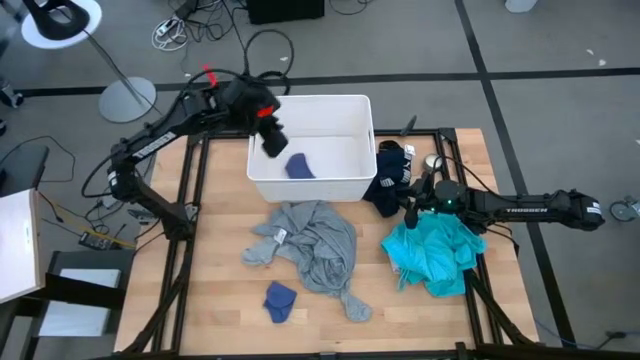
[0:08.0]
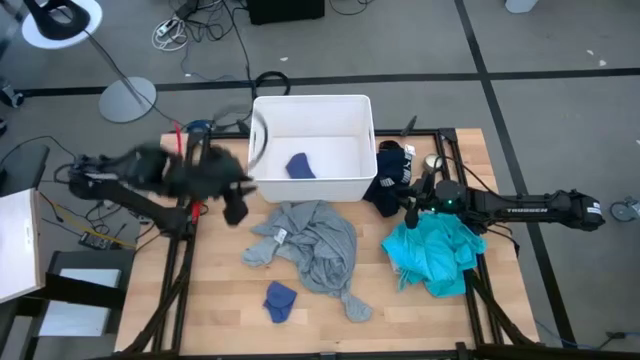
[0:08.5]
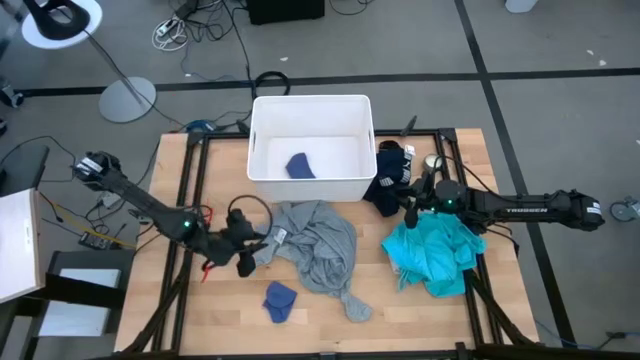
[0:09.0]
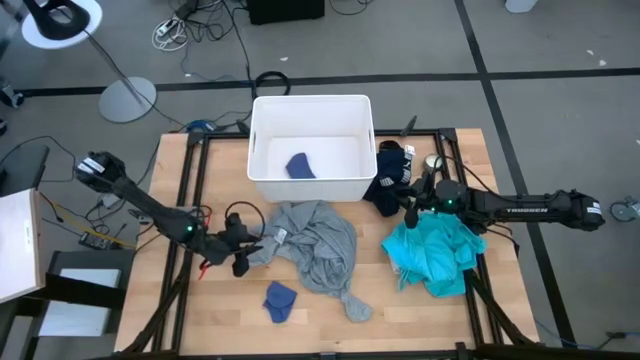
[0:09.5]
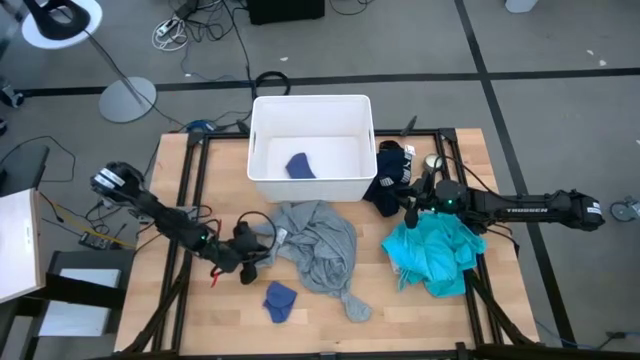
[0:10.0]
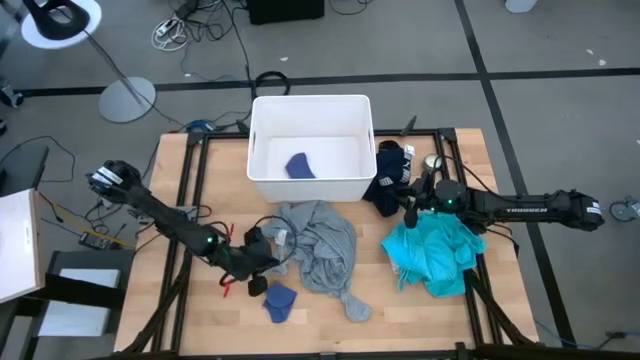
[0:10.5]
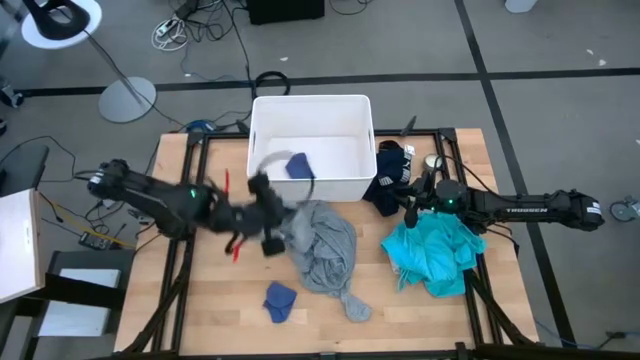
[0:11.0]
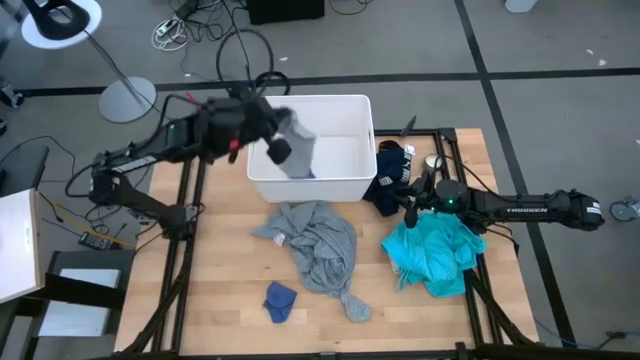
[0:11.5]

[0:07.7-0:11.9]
Task: Sort clothes
Put the left gray sock into the white laundry bin

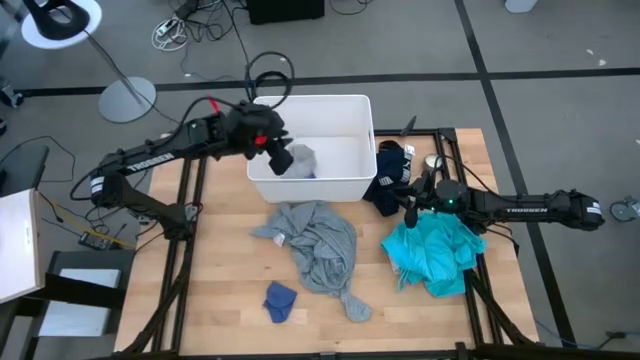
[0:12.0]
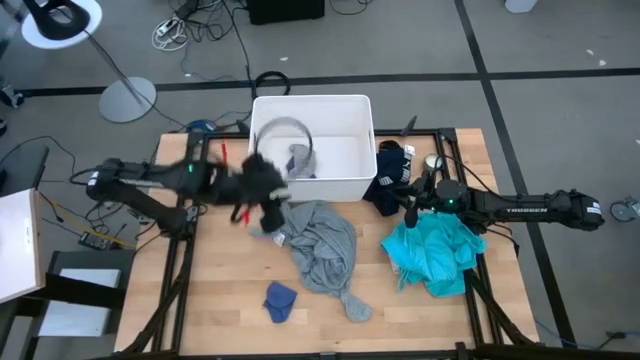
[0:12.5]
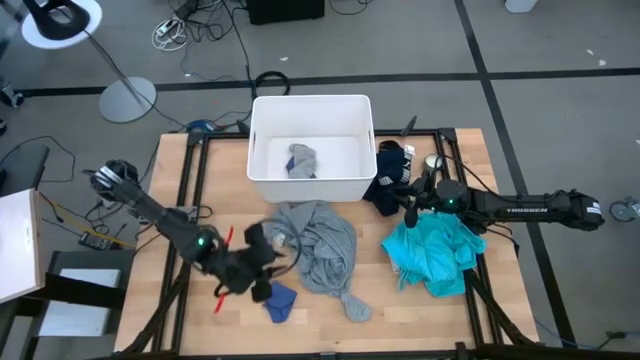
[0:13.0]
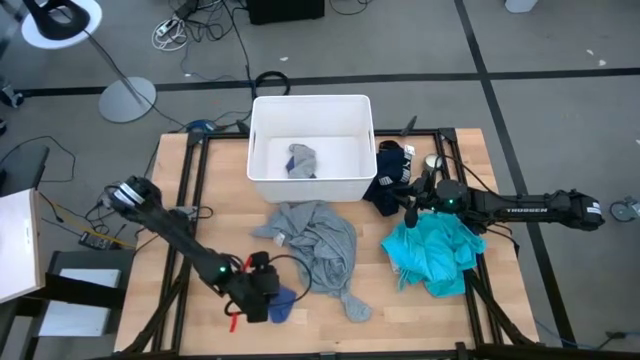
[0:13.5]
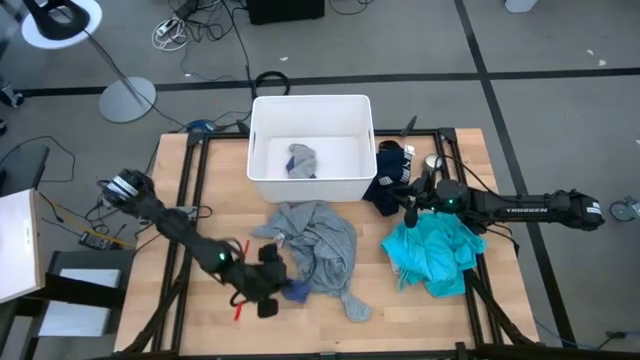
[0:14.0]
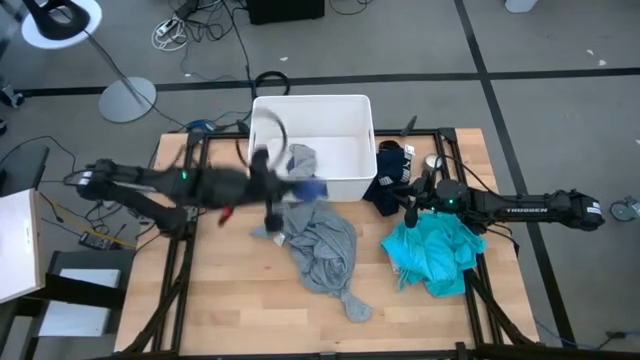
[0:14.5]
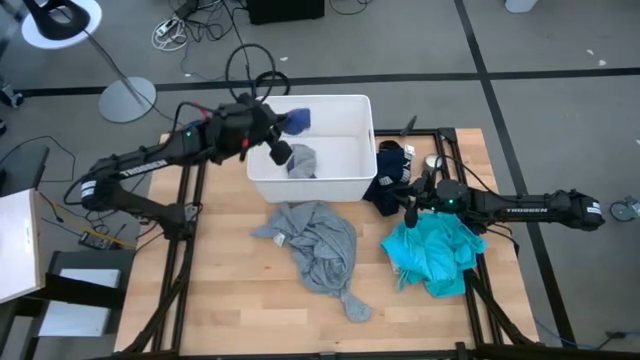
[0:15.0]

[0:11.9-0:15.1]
Put the blue sock into the white laundry bin

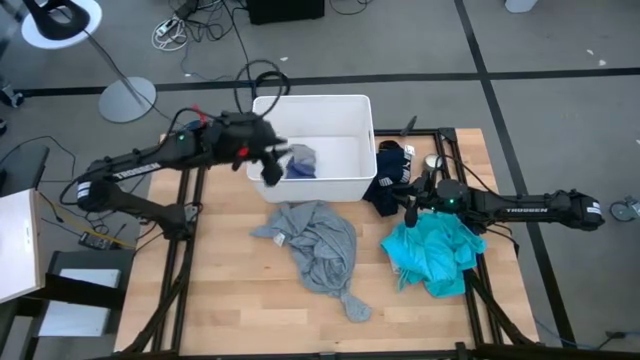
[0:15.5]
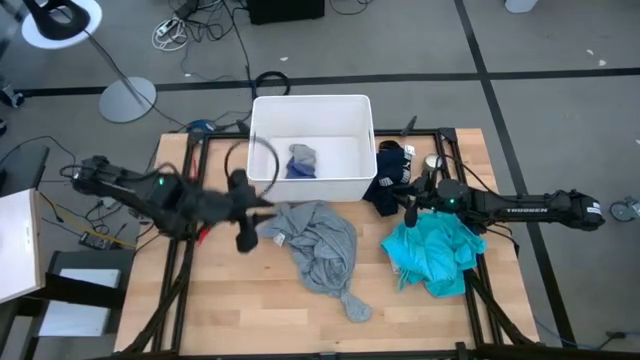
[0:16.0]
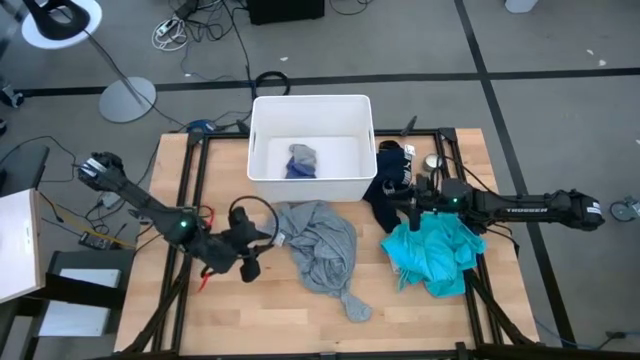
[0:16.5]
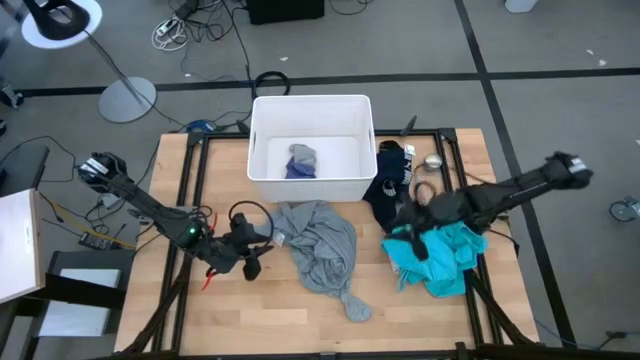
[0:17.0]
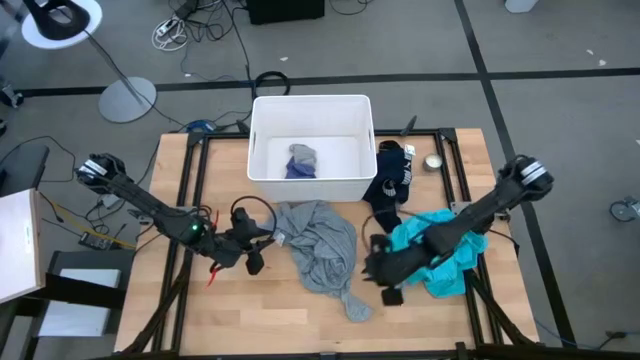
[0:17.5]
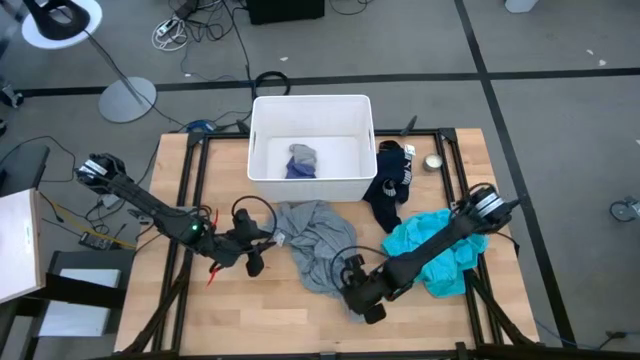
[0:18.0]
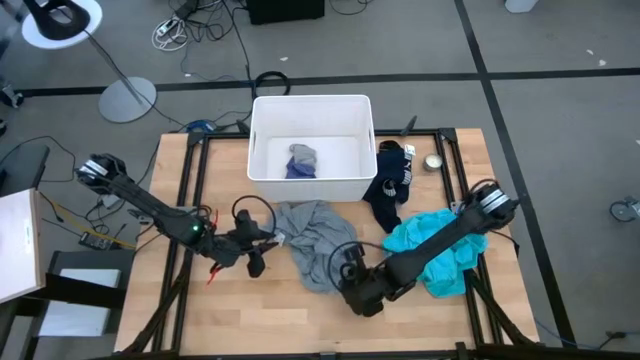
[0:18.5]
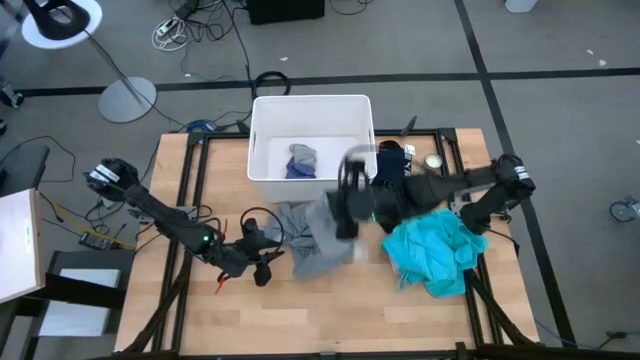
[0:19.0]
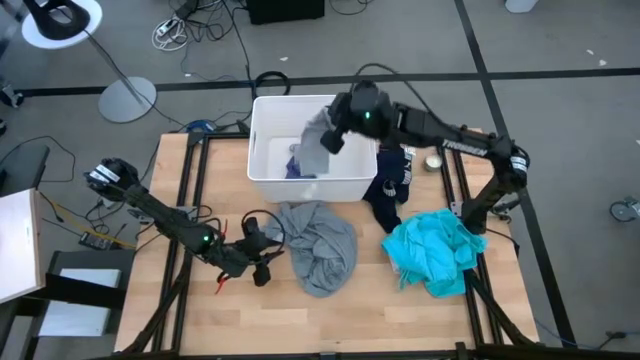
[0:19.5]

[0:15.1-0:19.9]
Put the gray sock into the white laundry bin

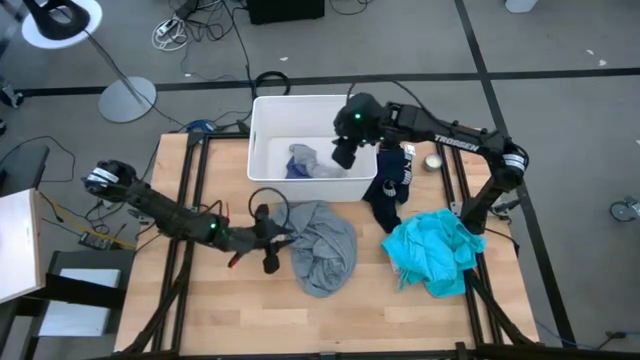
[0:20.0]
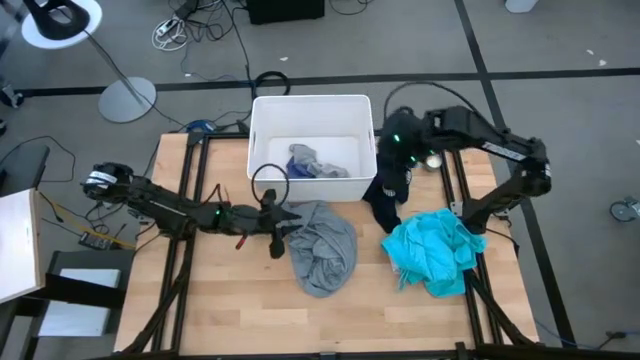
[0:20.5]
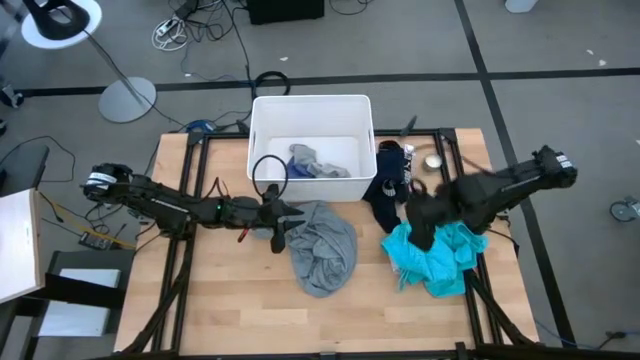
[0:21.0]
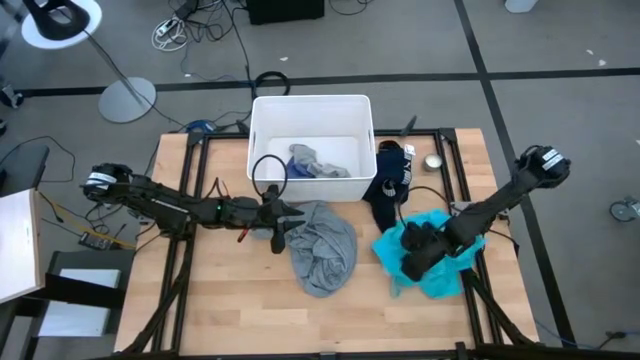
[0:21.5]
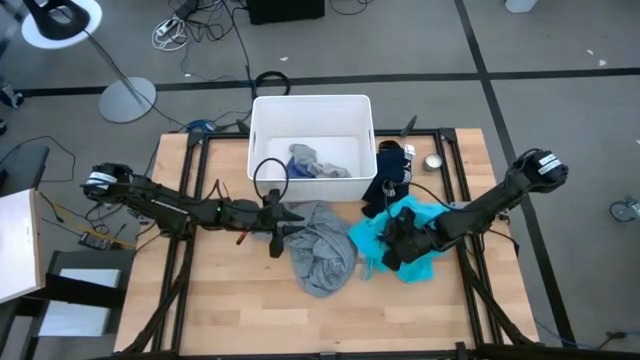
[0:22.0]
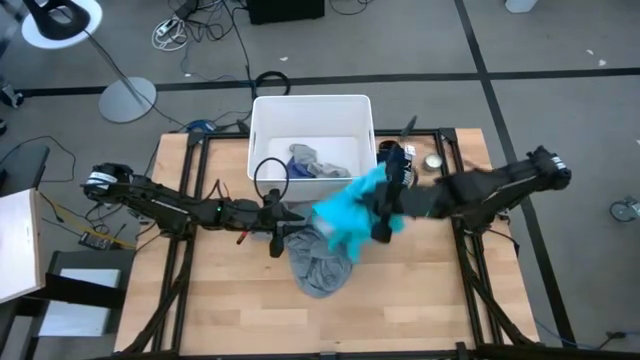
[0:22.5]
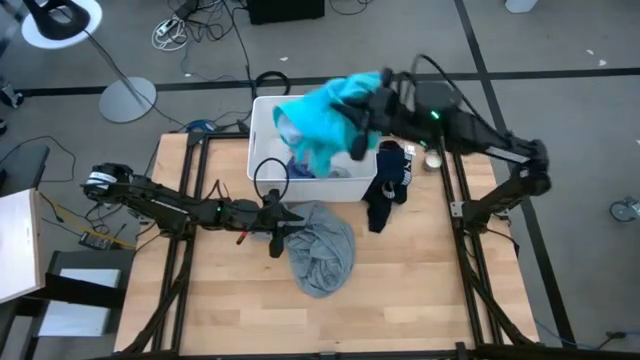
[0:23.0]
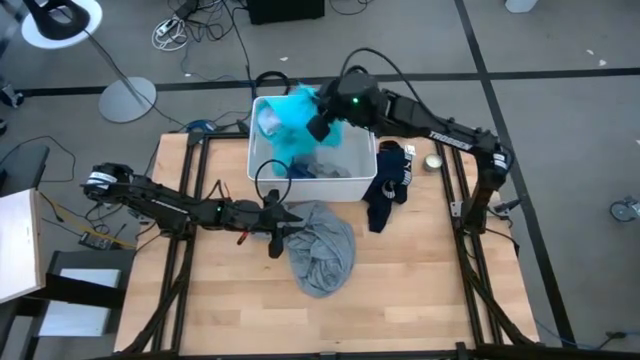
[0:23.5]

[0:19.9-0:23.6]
Put the blue shorts into the white laundry bin

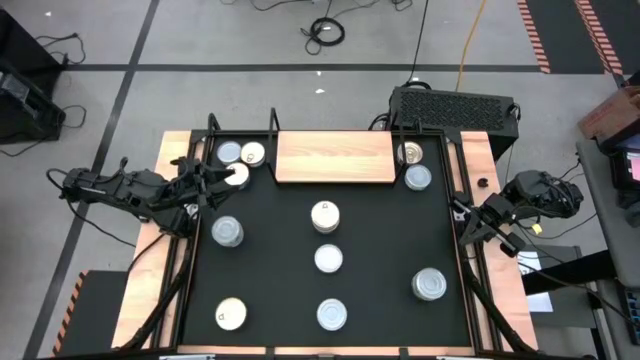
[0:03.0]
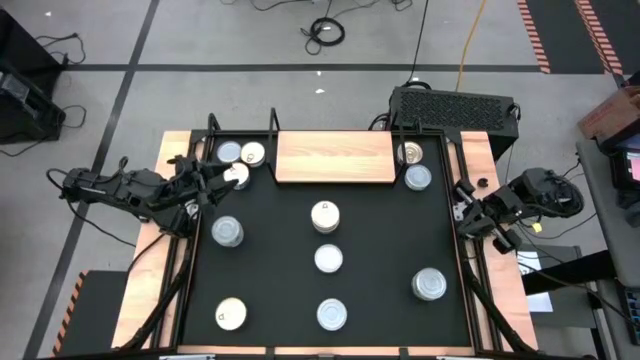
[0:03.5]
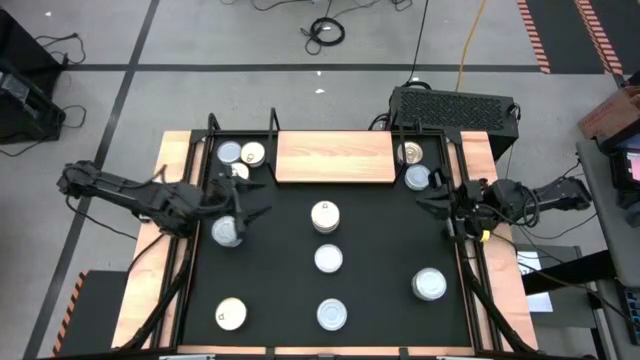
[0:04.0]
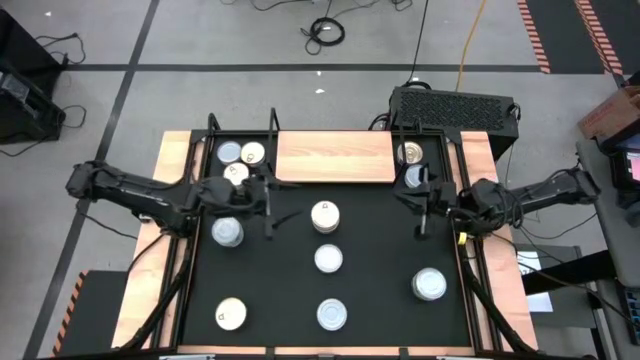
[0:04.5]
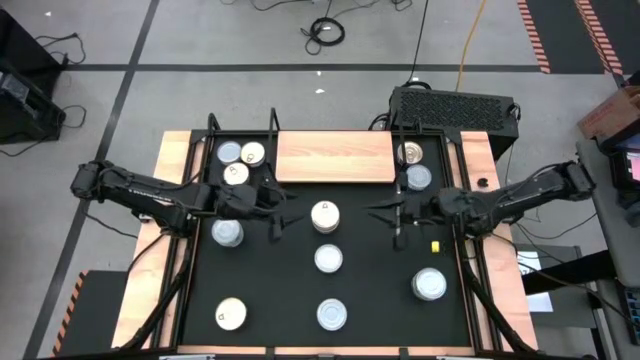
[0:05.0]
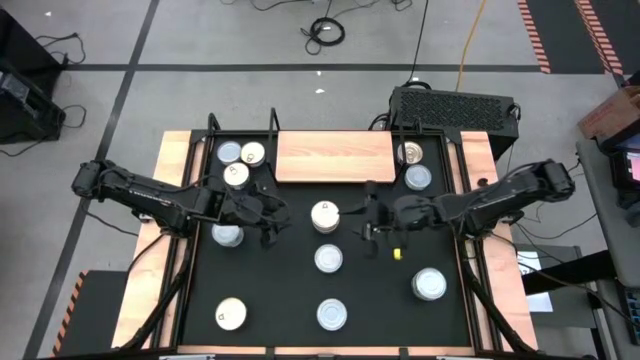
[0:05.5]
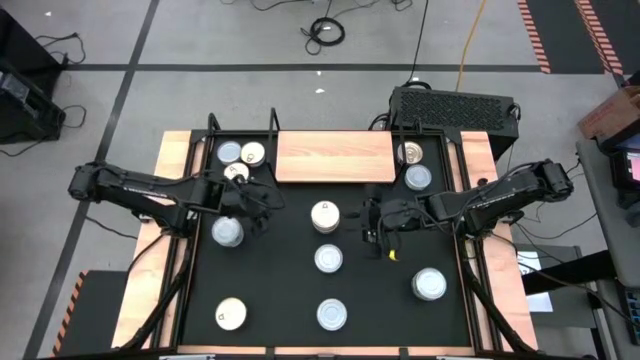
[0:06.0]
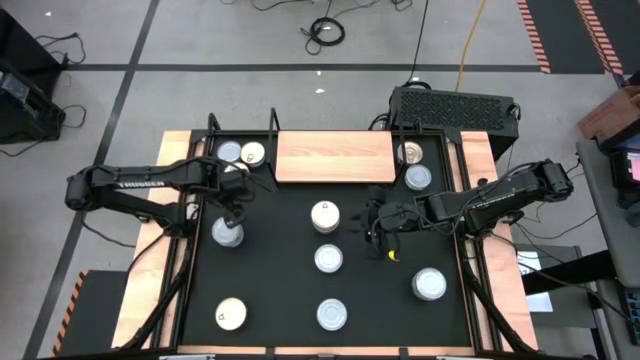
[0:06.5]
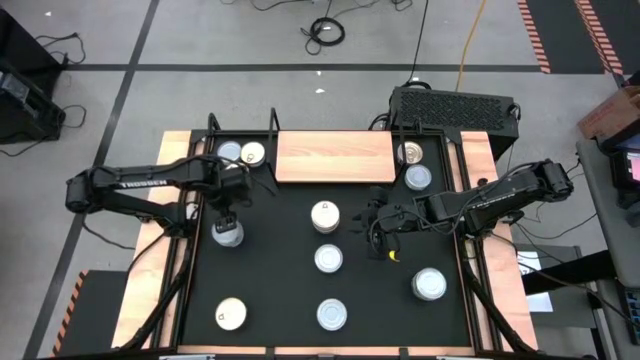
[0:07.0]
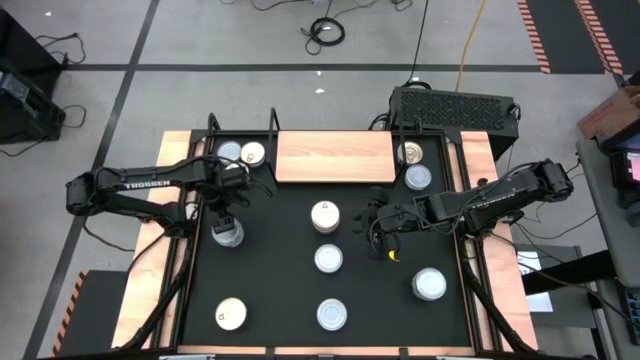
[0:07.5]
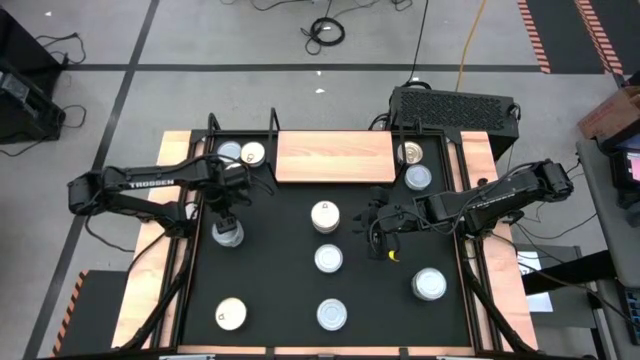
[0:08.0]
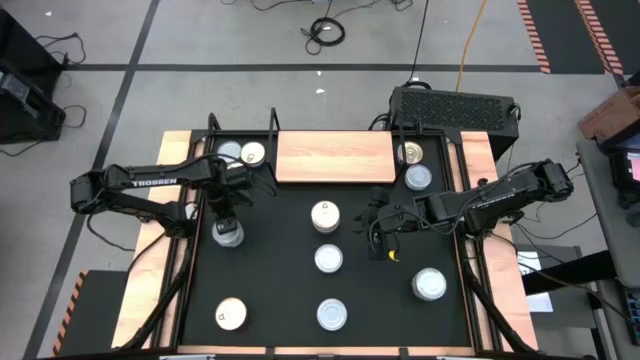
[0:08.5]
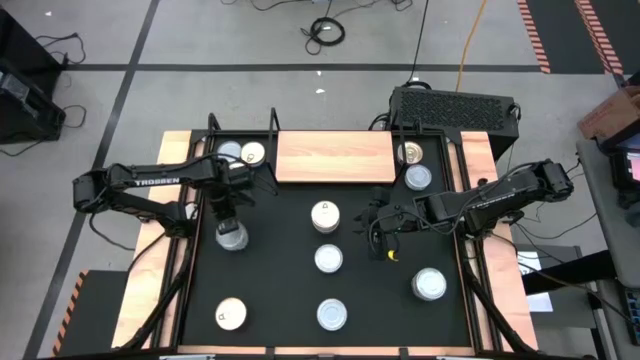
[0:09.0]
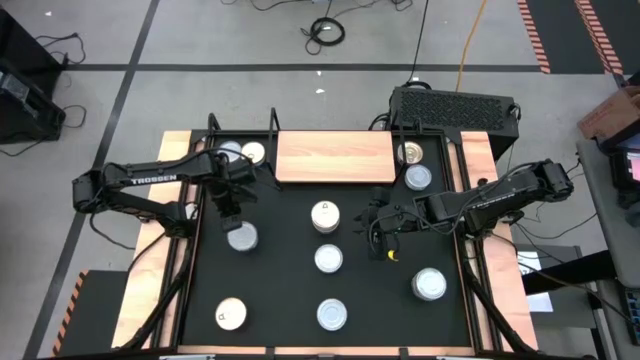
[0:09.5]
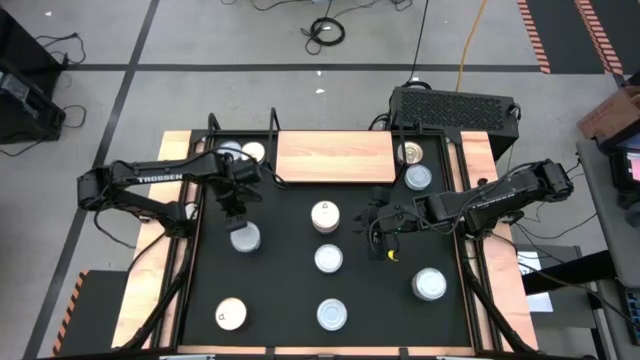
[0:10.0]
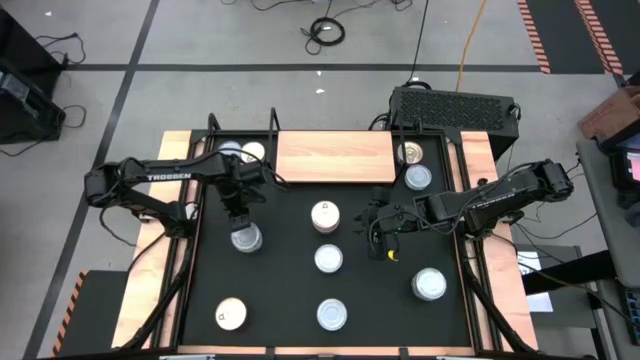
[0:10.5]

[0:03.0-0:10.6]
Task: Stack canned seafood by type on shelf
Put the middle left green tuna can on the shelf
